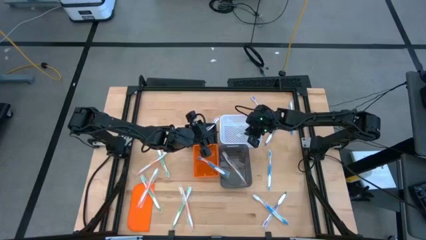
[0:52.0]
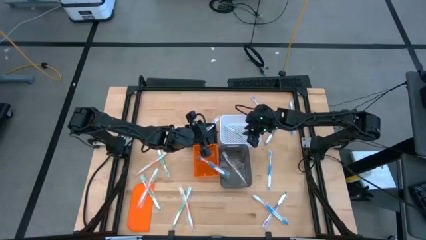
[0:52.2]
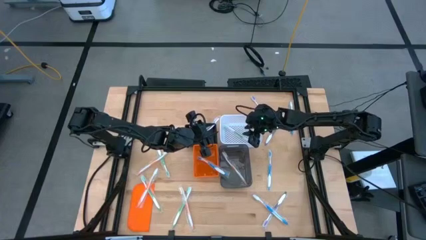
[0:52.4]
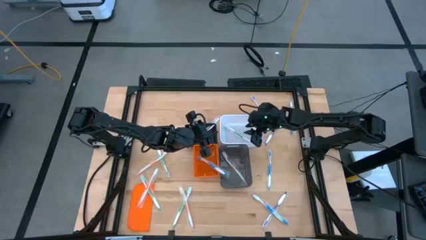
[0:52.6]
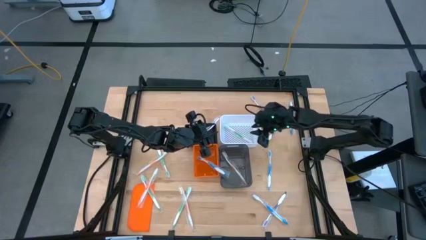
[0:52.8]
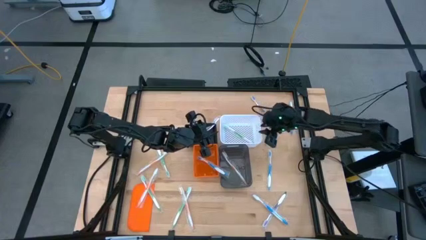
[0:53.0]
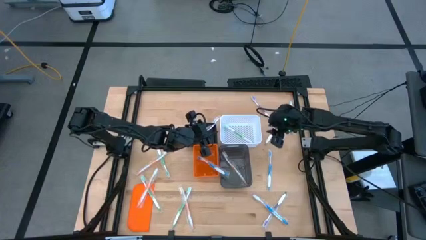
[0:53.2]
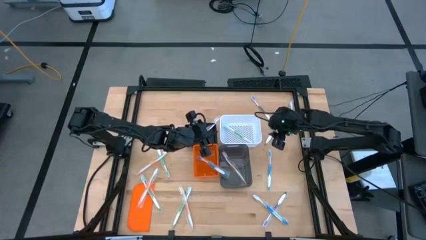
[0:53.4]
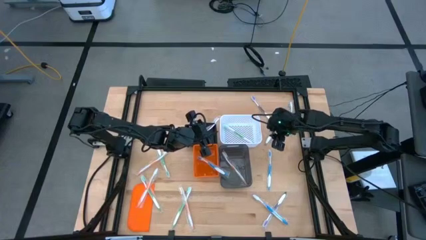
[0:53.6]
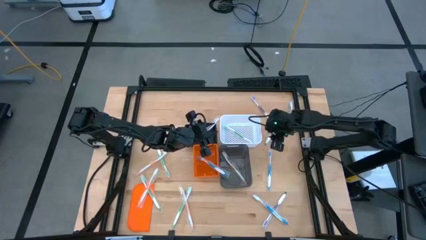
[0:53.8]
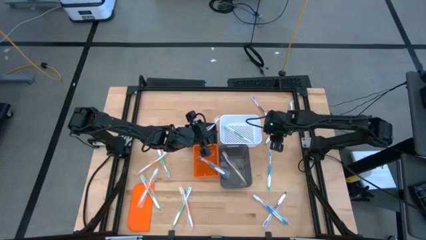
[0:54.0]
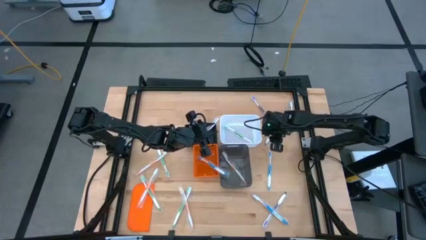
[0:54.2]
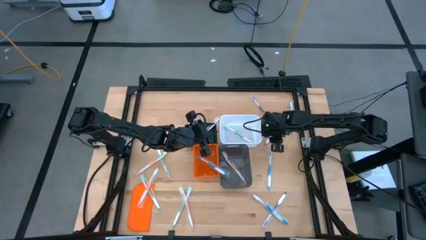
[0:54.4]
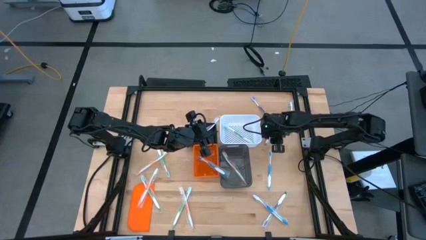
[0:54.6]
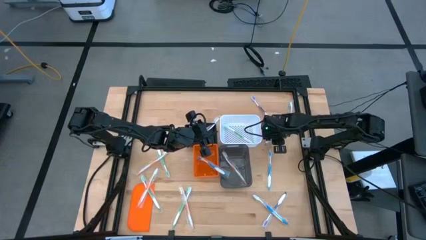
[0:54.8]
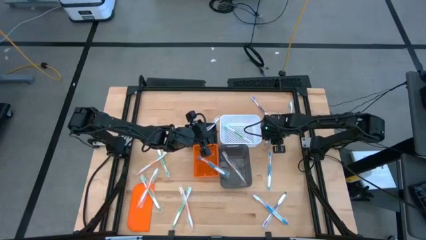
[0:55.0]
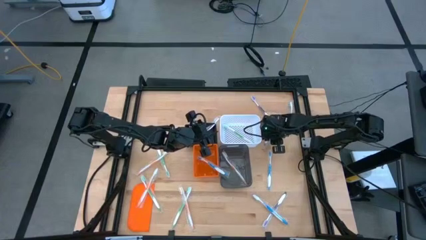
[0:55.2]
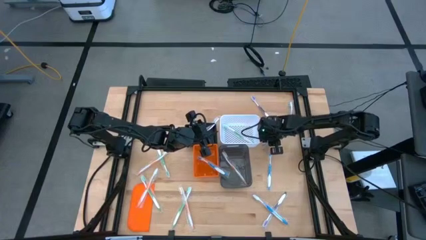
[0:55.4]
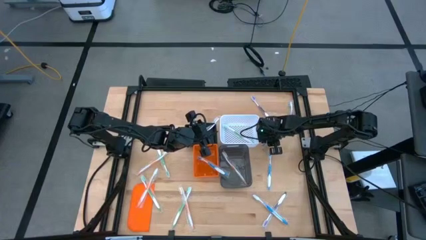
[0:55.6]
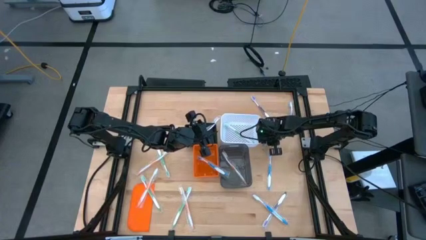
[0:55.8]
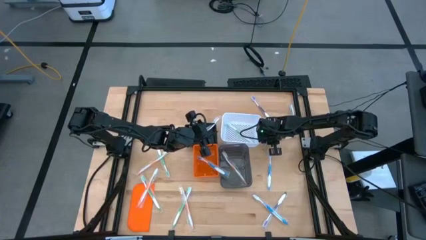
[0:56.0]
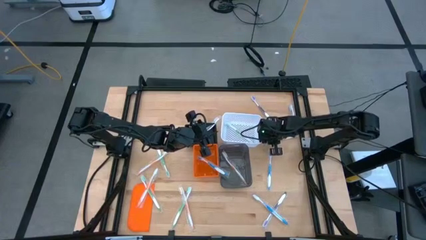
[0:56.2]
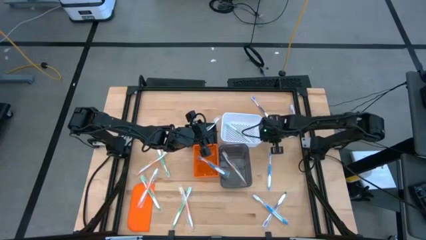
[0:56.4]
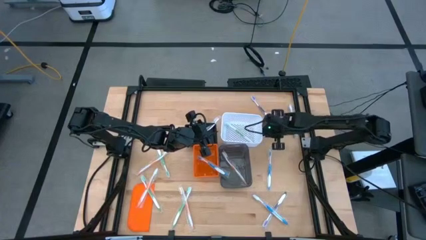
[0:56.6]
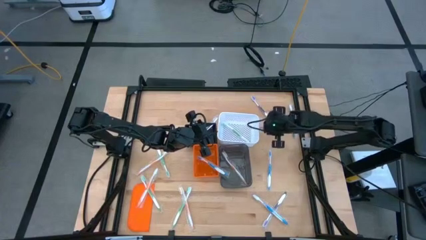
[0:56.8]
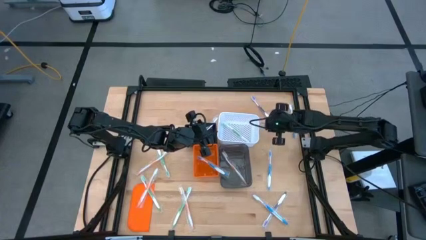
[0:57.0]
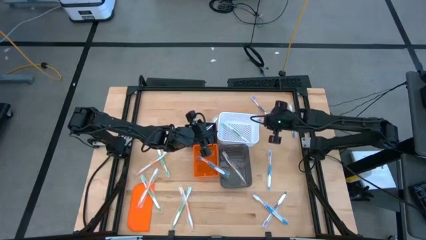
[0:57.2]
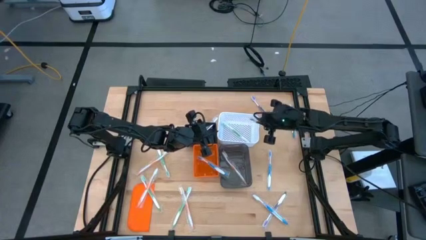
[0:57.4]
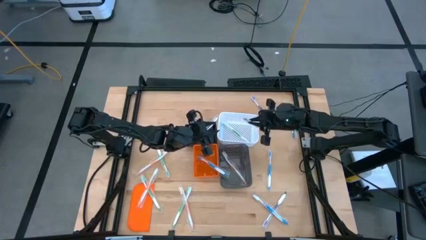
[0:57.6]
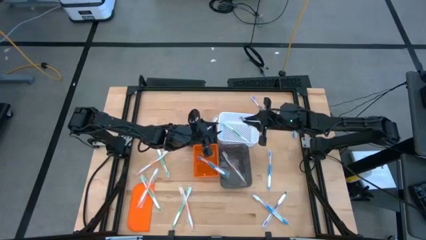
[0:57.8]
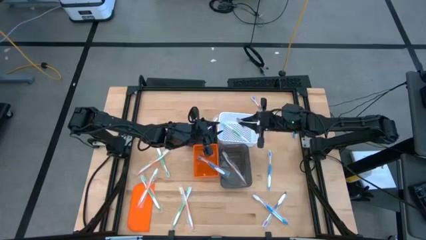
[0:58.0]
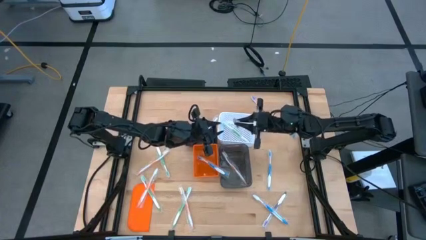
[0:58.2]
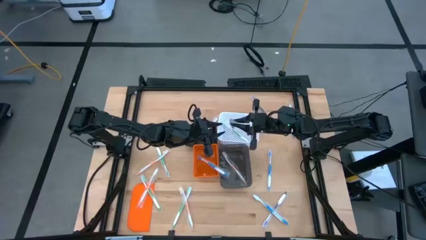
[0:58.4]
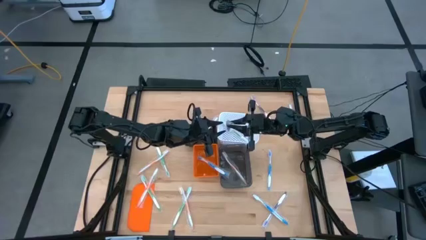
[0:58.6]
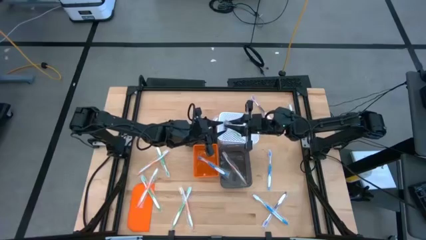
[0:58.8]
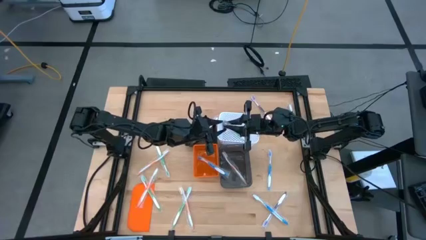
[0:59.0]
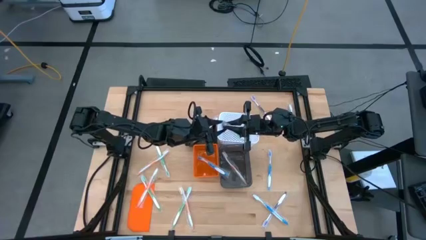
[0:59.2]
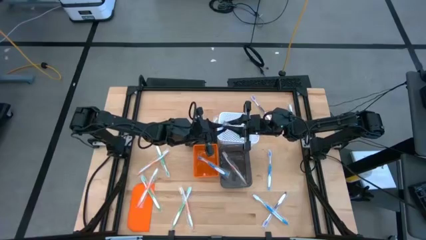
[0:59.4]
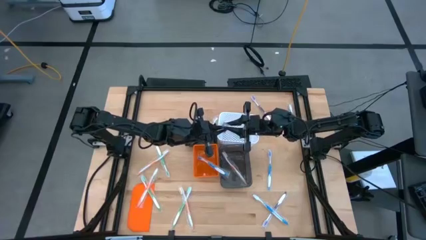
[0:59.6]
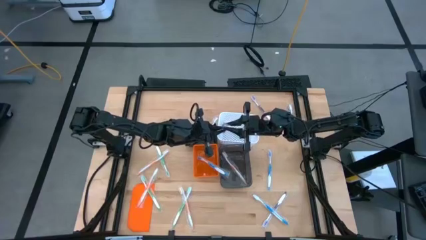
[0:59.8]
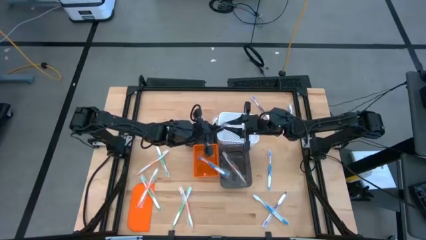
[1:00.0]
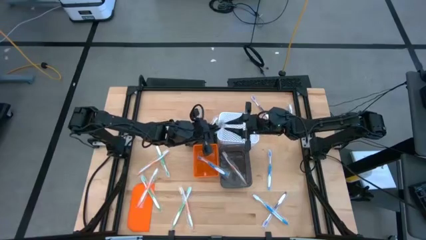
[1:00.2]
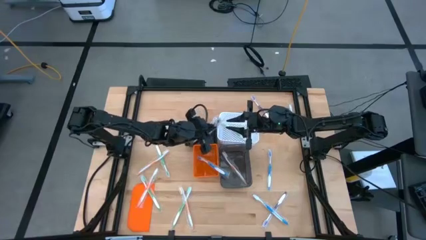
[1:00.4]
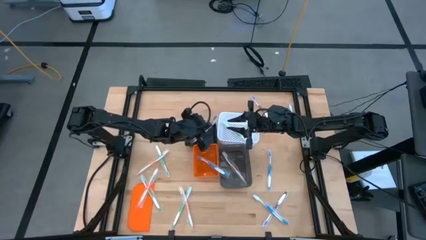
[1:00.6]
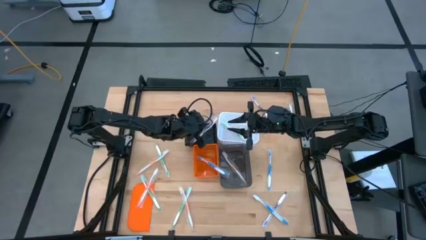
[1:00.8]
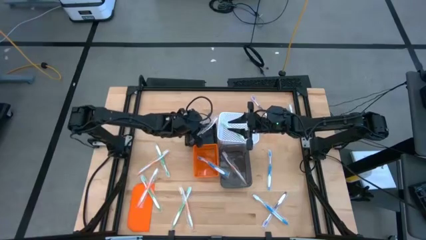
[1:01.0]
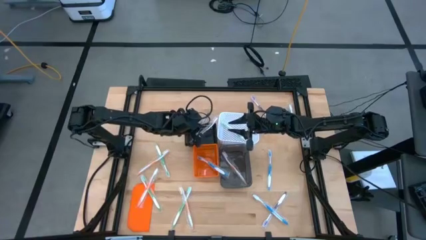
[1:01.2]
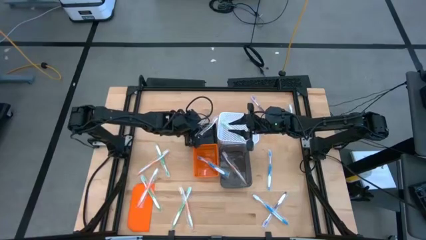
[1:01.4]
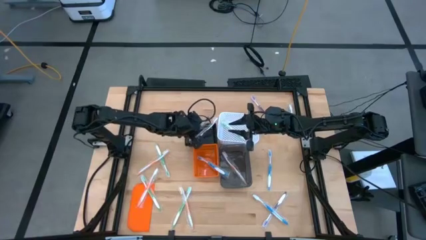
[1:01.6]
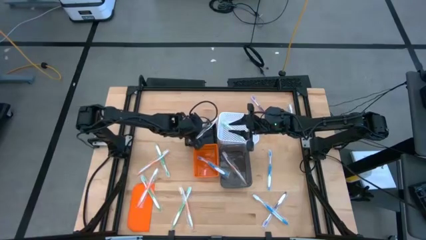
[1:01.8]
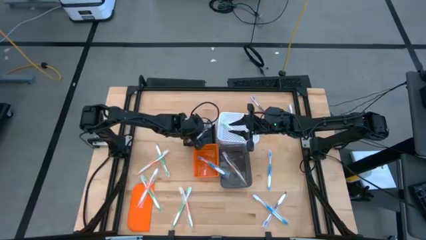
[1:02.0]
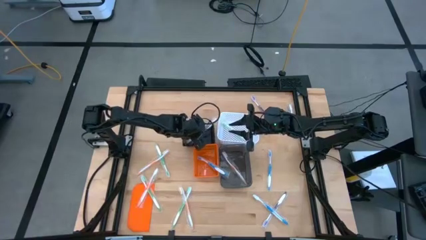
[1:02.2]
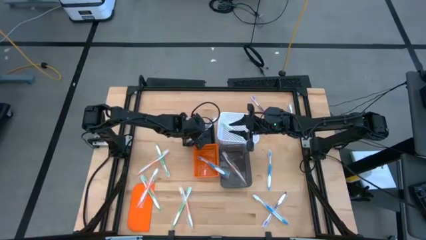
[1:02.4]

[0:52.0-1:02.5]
Task: Pick & Place Toothbrushes
Put the violet toothbrush into the black bin

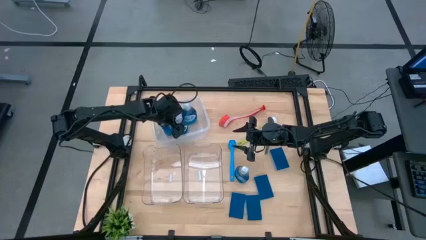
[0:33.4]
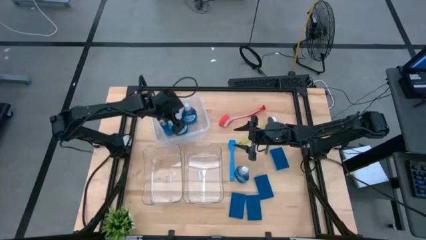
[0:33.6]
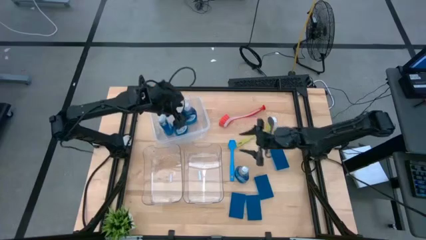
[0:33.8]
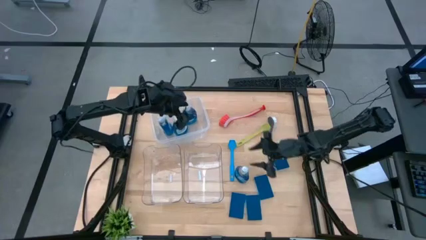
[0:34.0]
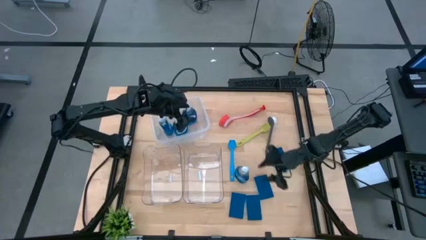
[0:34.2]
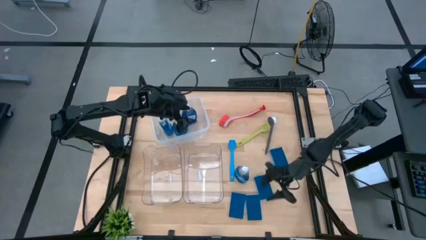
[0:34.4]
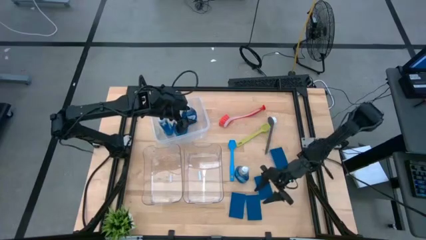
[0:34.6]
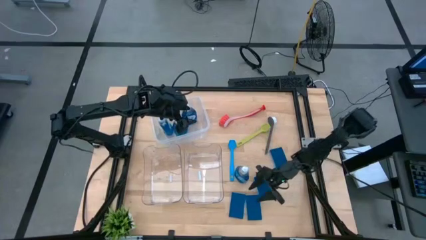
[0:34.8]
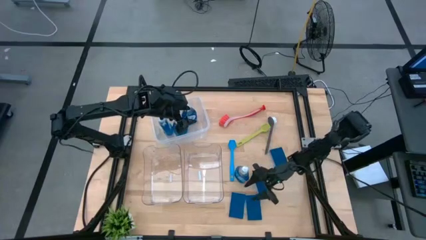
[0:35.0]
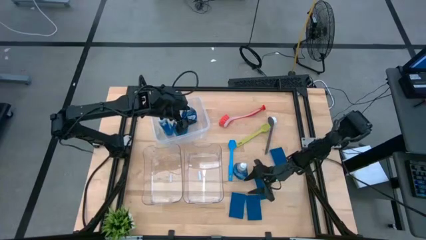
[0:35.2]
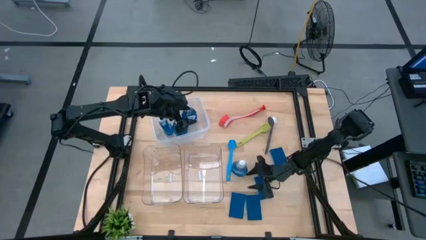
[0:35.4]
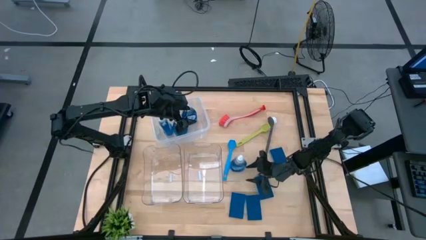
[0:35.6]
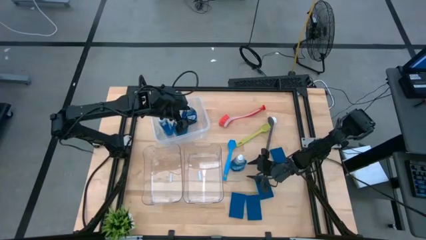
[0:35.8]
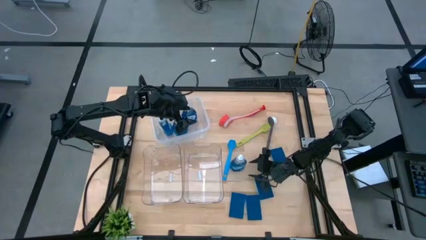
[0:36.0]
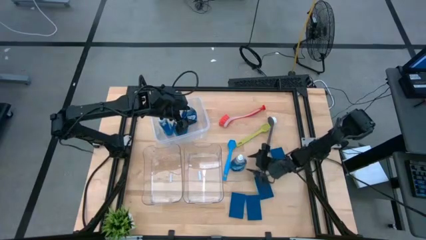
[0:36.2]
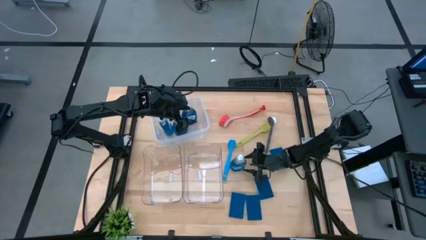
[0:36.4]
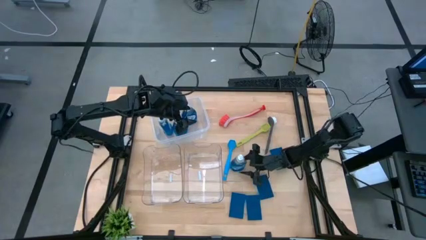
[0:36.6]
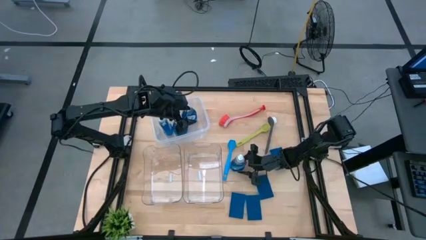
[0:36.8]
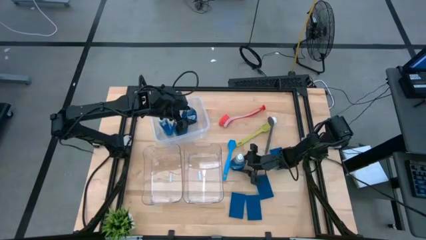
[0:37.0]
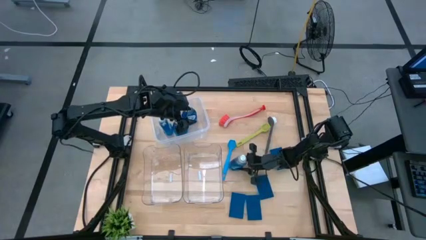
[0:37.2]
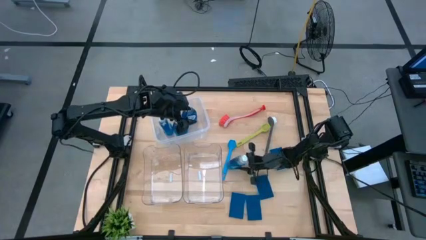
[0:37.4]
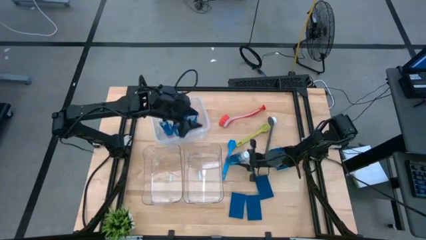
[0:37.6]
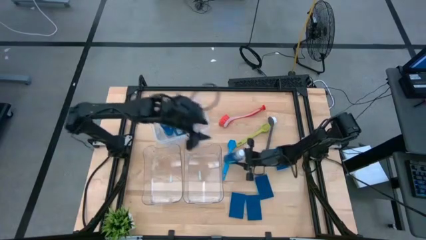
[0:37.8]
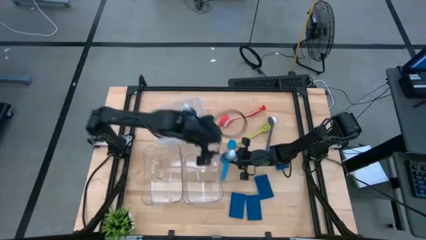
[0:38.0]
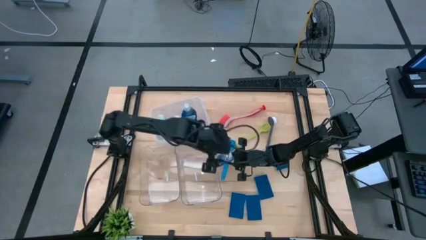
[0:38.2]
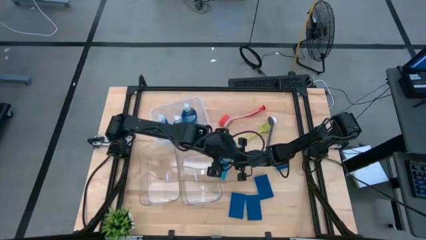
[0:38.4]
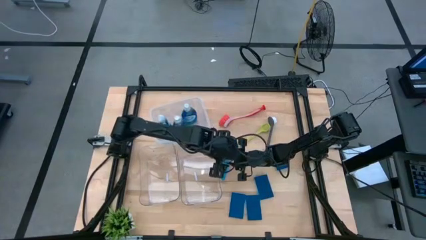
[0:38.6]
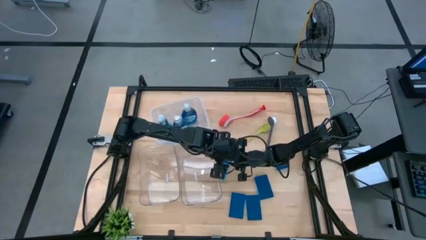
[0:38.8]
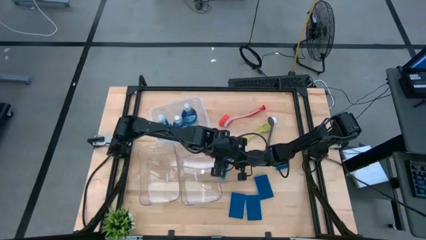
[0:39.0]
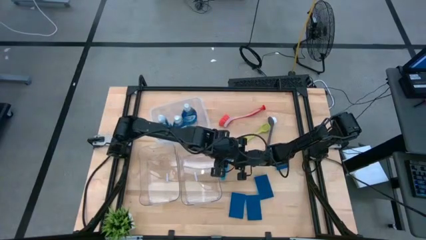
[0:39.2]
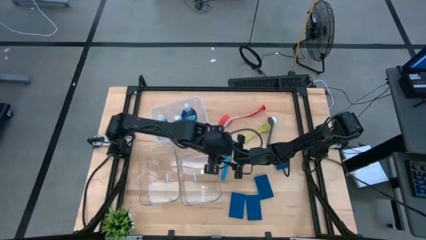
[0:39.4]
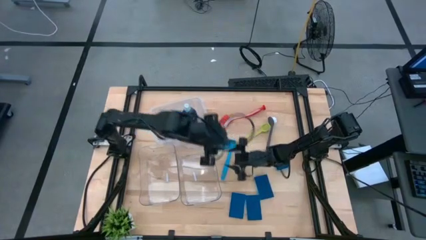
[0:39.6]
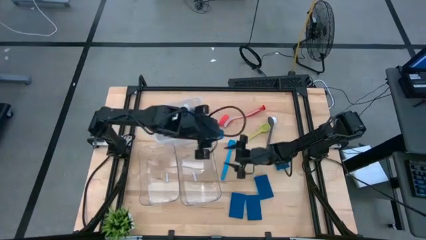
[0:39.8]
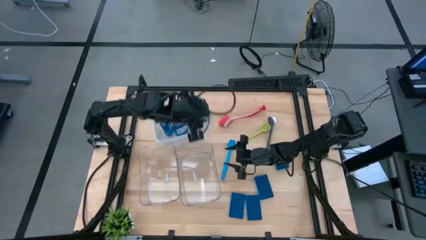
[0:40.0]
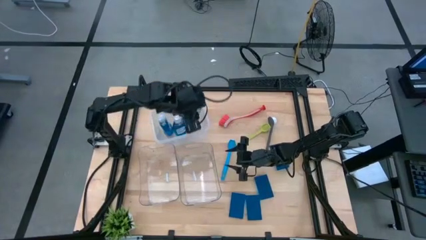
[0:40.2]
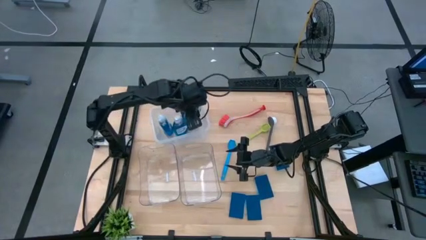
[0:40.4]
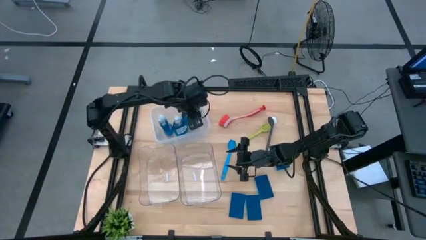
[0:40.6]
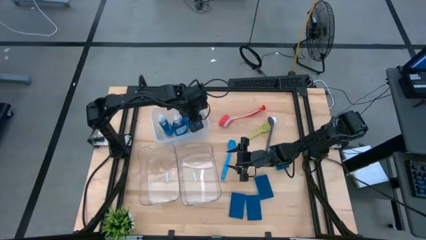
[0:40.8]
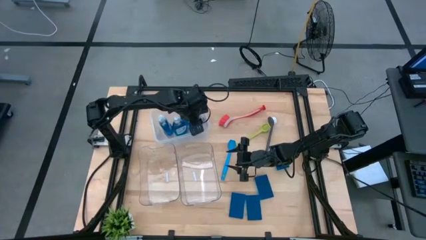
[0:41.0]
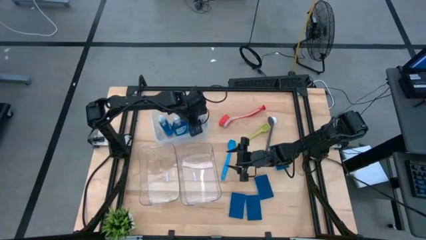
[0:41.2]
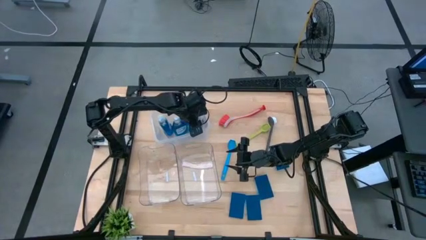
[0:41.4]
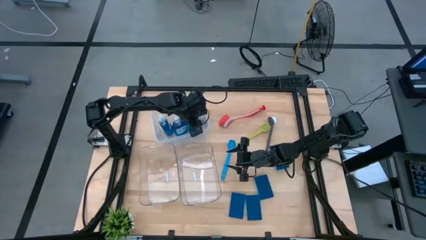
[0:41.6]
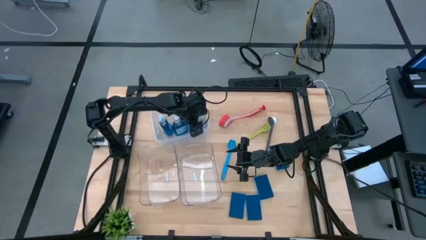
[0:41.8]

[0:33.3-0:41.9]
Task: Pick & Place Kitchen Sink Supplies
Put the blue dishwashing liquid bottle into the white transparent bin
